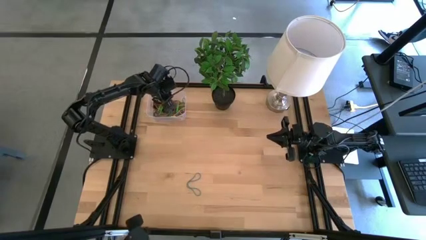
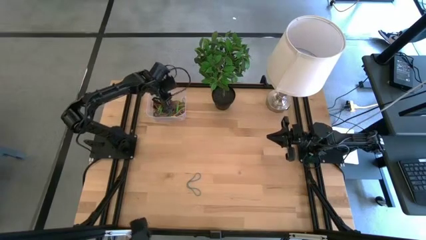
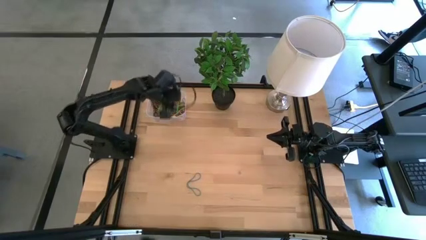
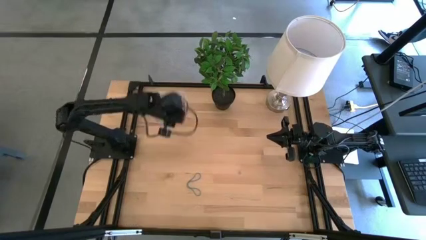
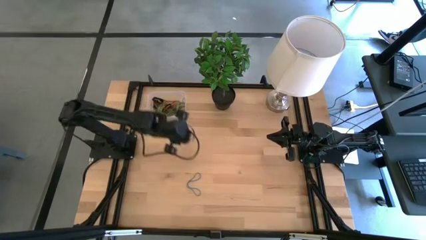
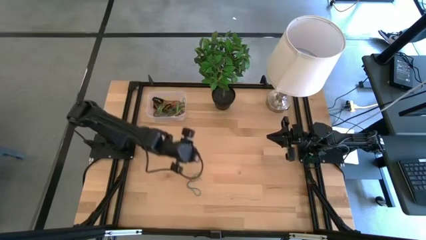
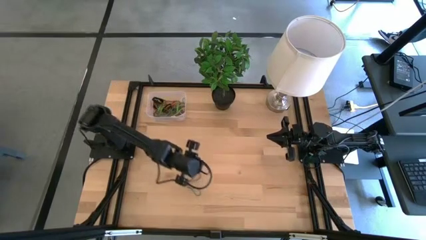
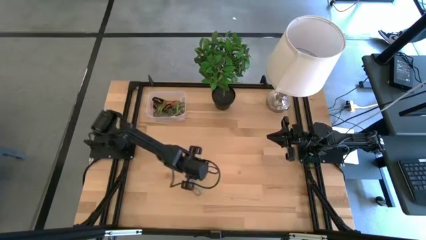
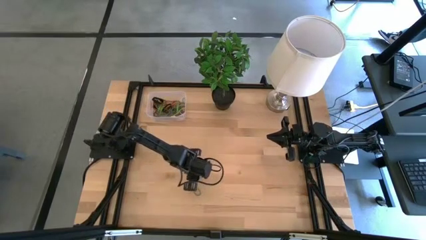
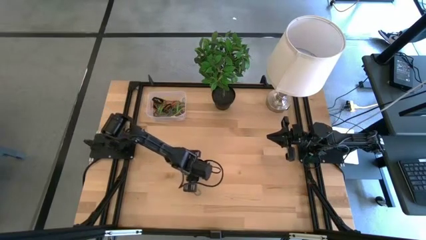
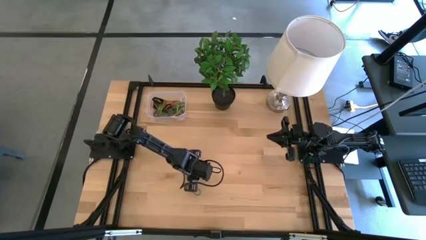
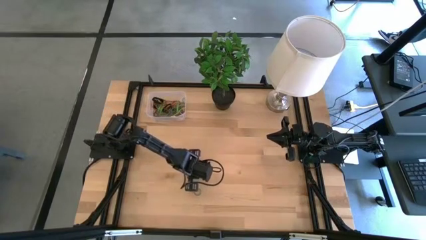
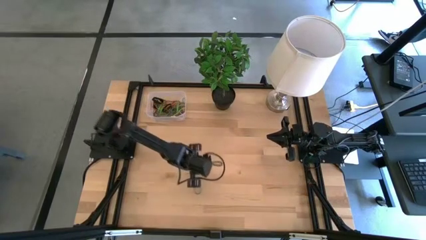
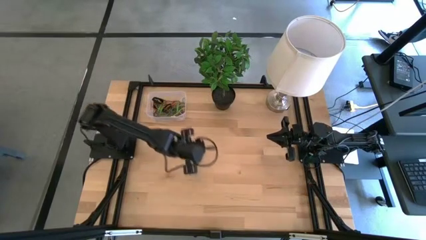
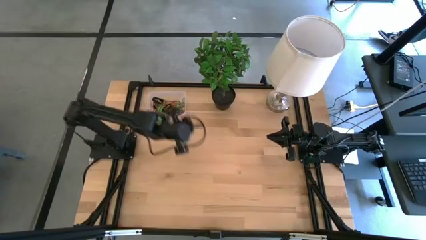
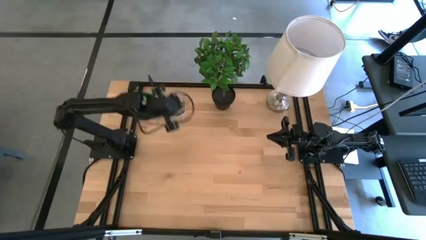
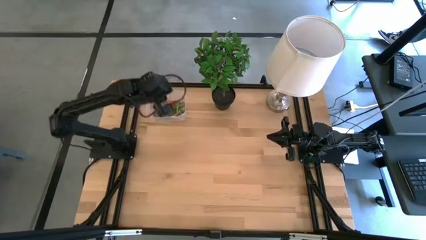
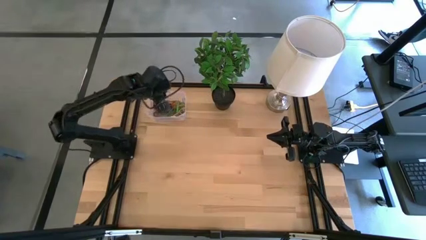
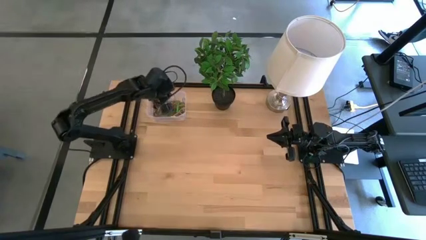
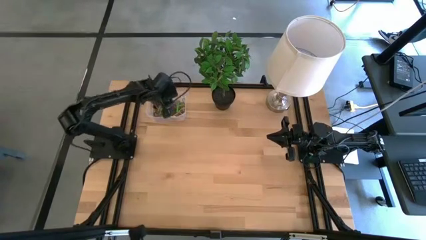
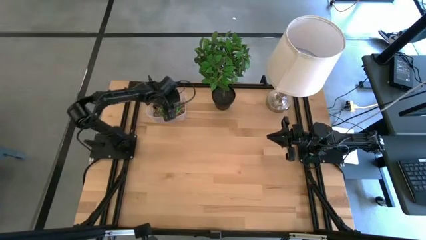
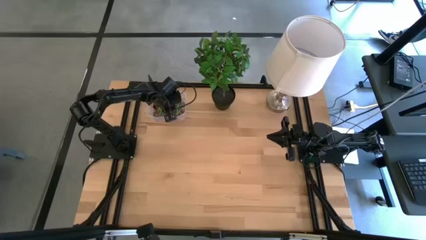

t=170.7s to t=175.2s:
Task: Pick and place rubber bands into bin
Put the blue rubber band into the transparent bin

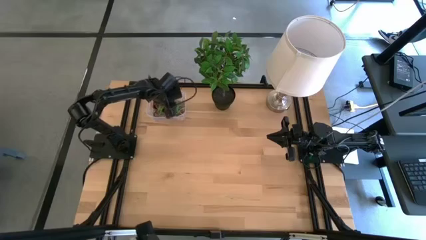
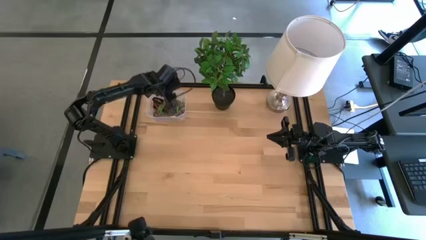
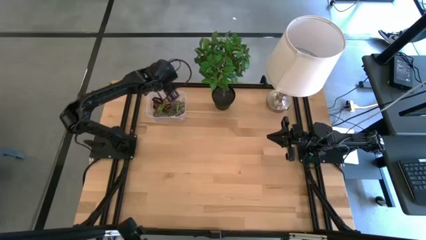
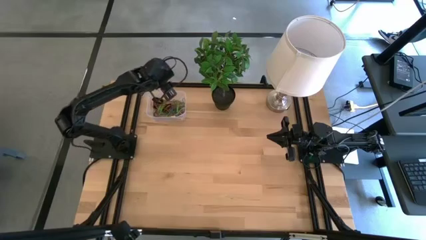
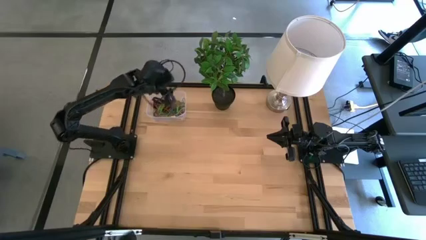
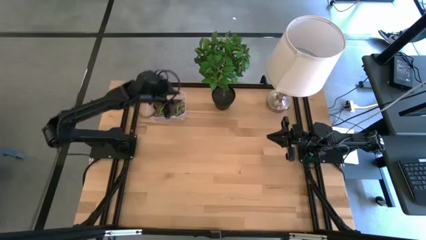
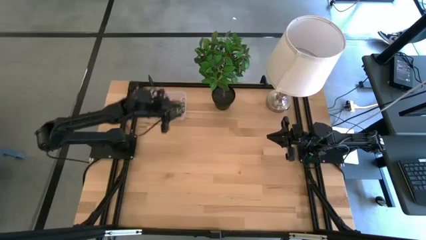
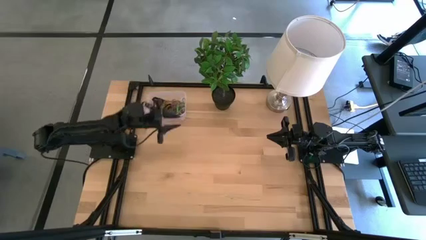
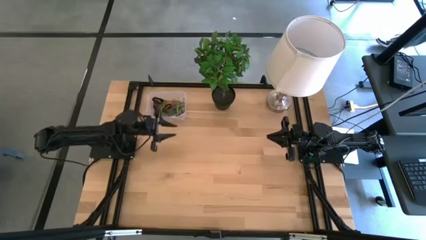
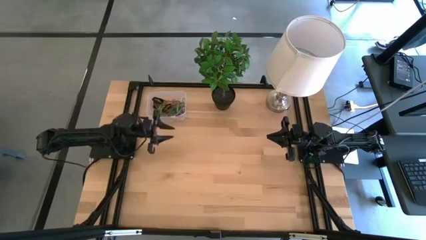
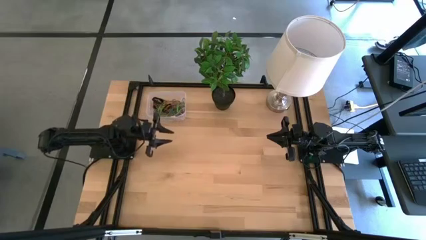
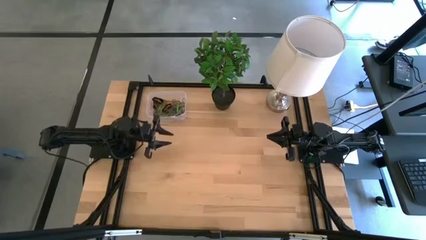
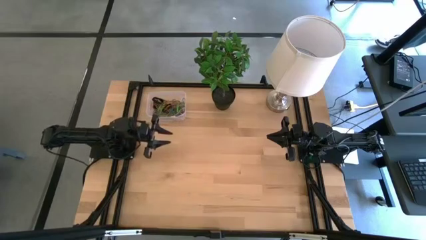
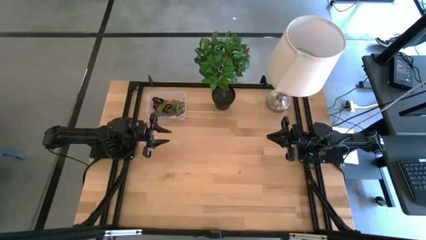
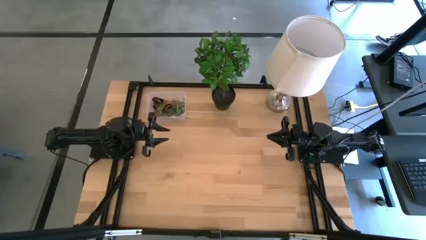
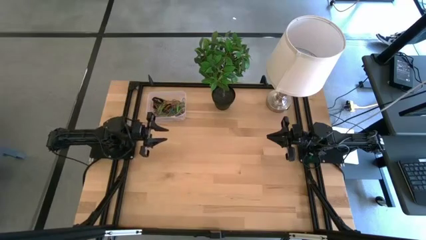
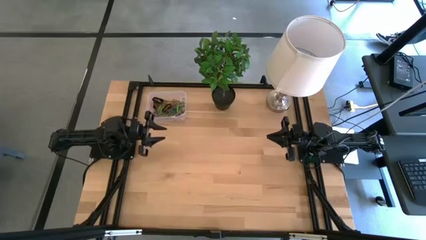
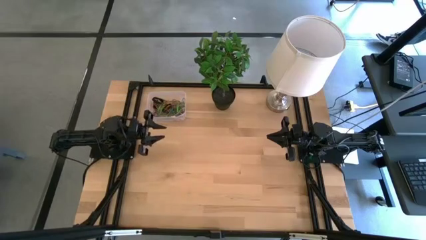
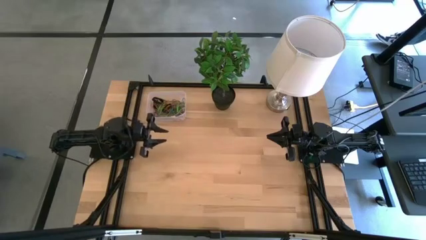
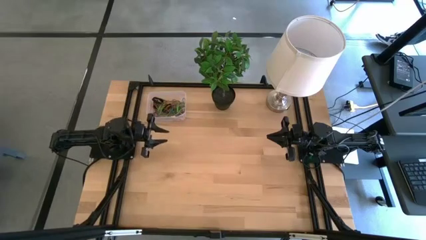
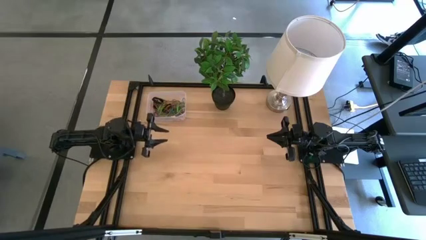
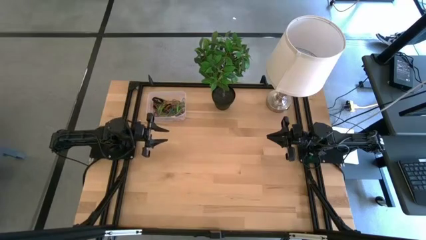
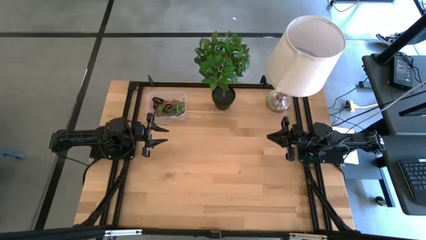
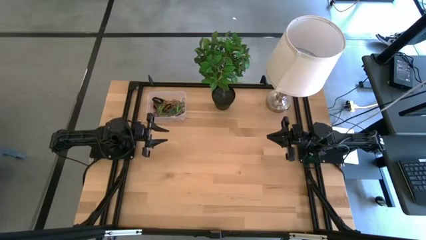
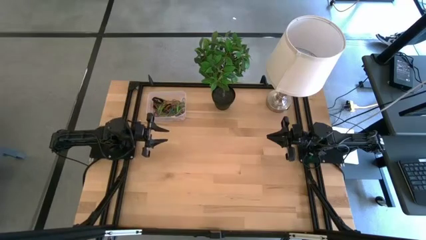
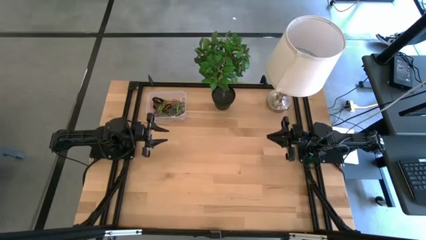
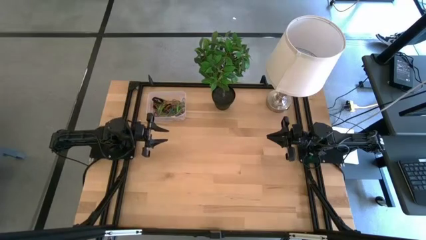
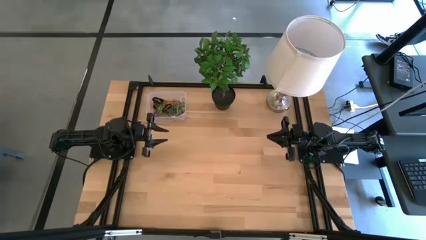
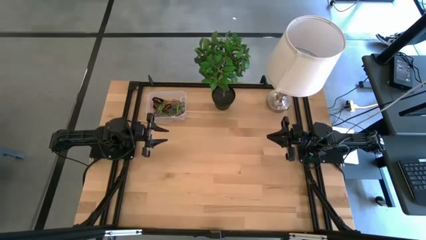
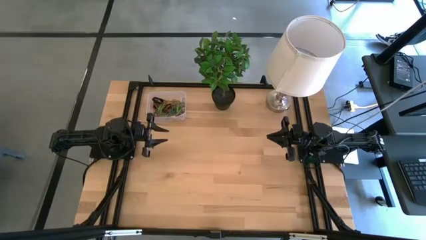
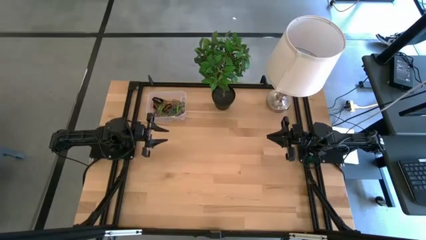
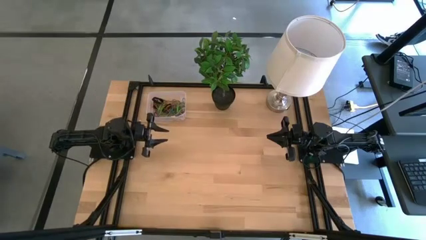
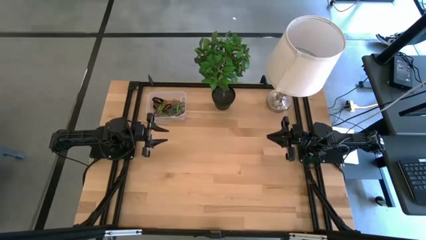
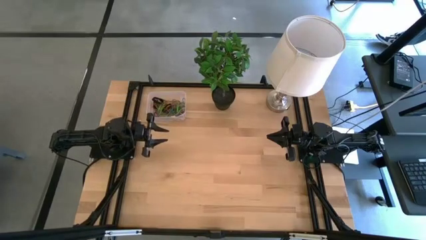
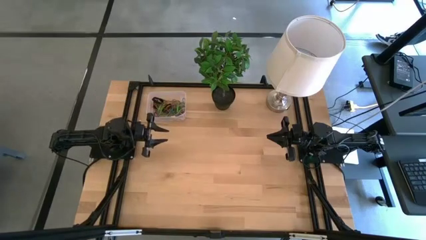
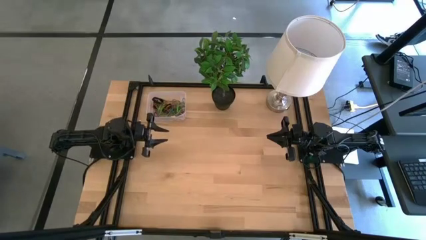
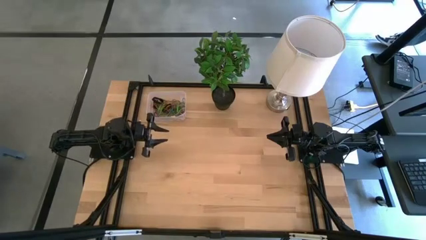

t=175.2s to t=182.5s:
Return to Home Position

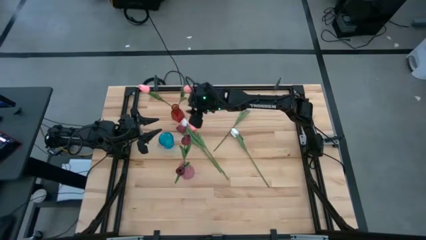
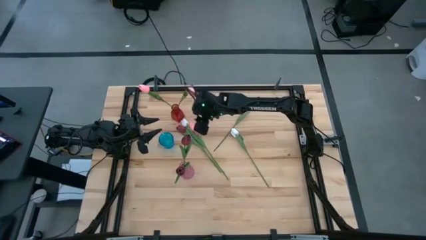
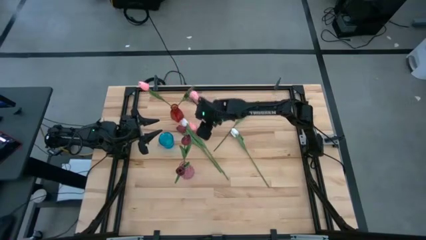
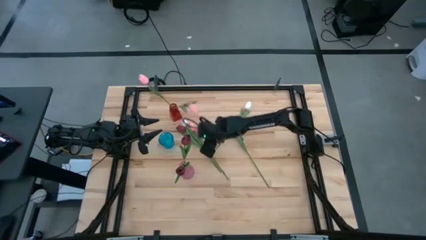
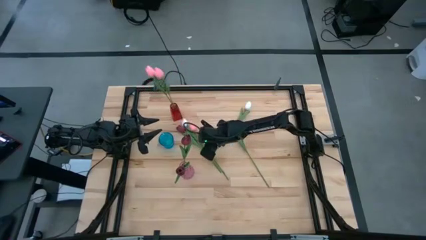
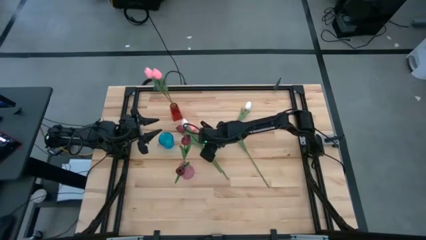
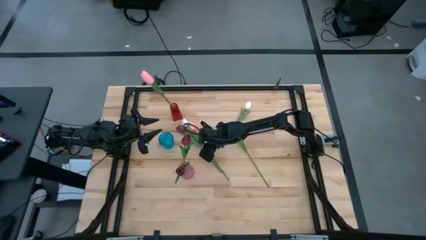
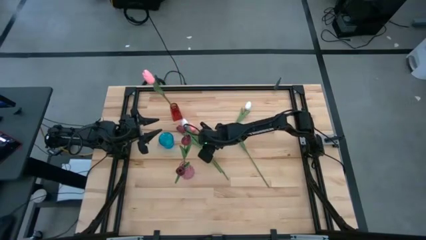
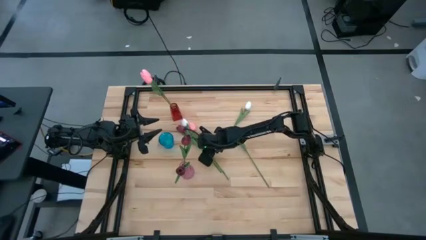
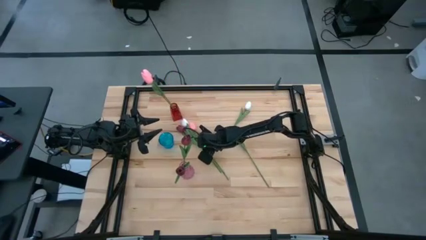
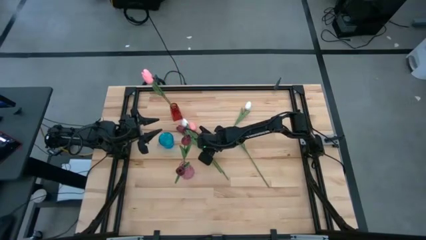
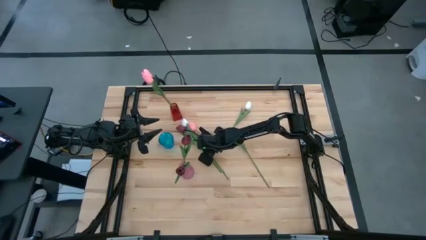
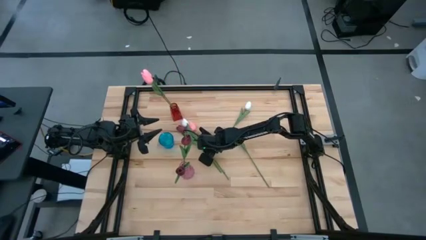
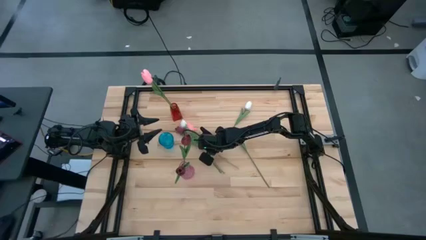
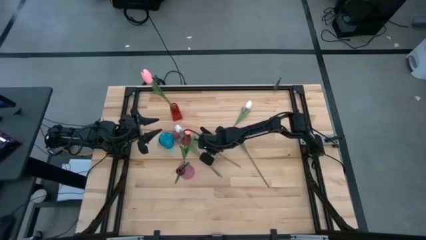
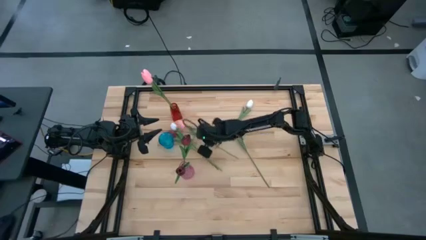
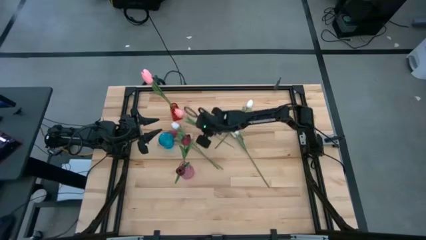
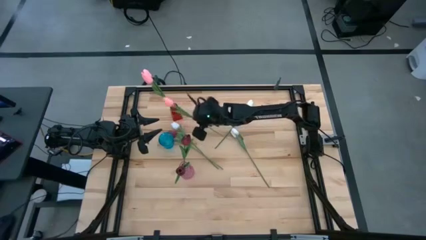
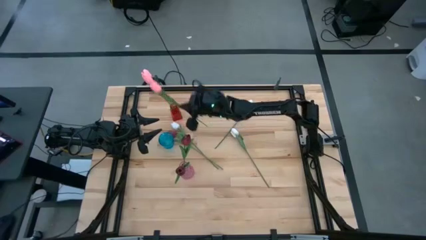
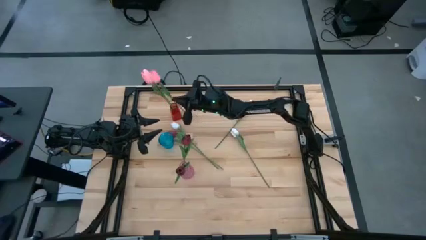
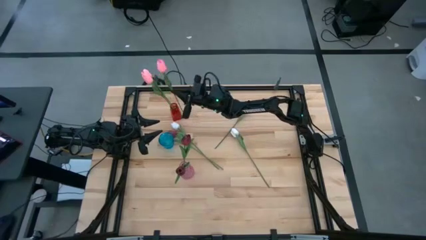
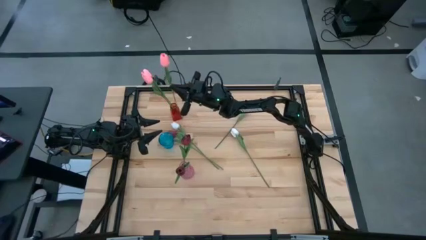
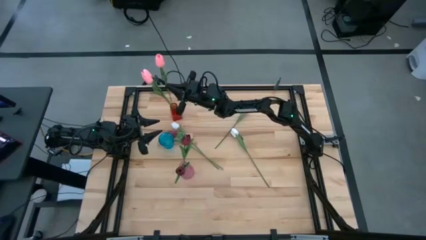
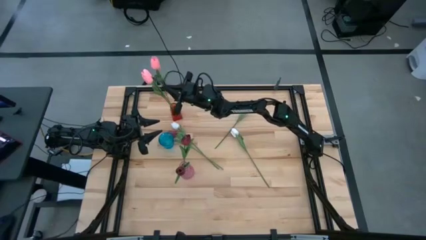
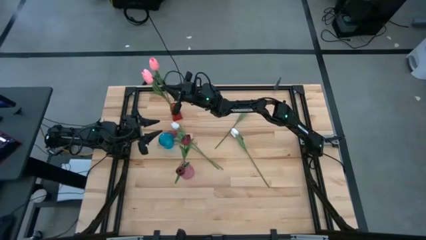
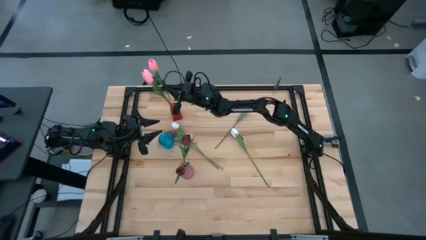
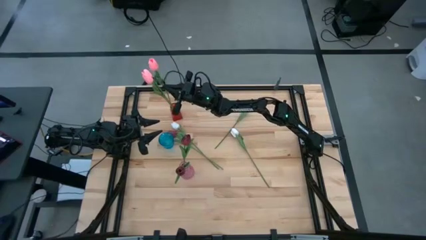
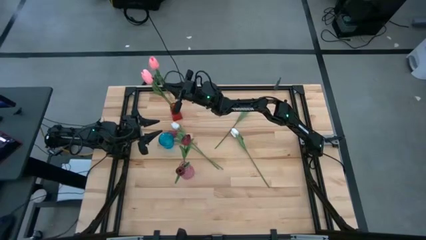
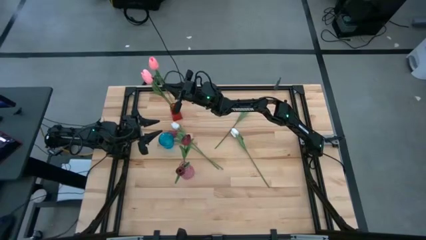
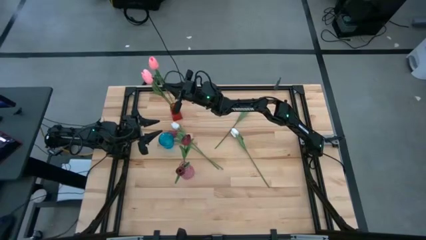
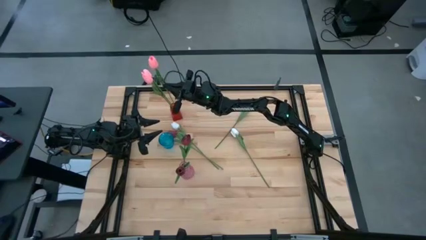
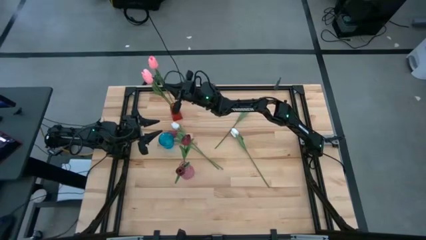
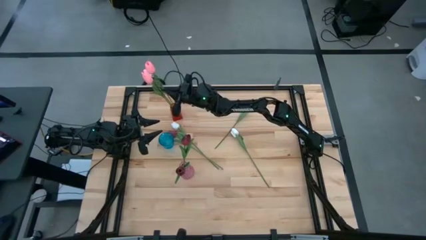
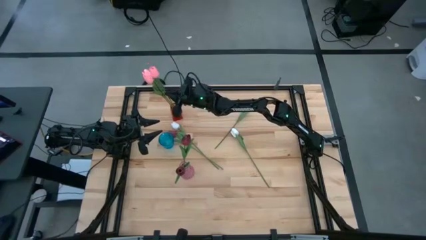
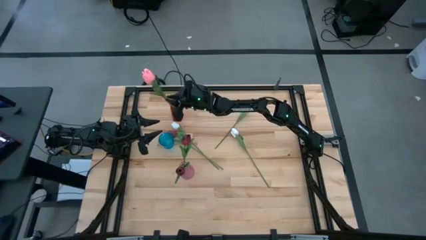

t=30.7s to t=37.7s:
Task: Sort flowers into vase by color
Put the pink tulip into the red vase
